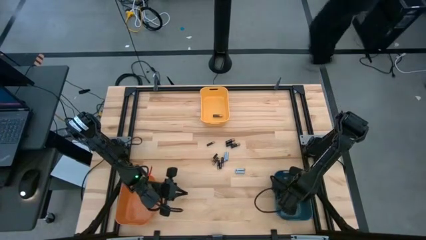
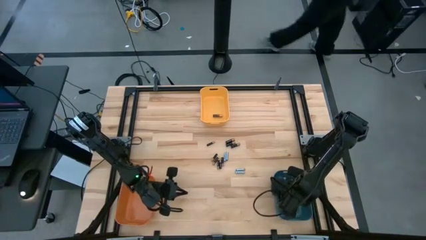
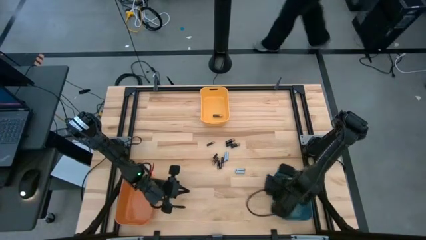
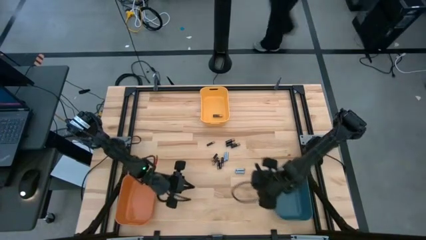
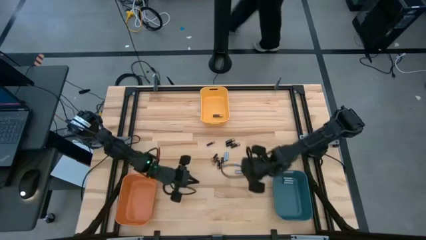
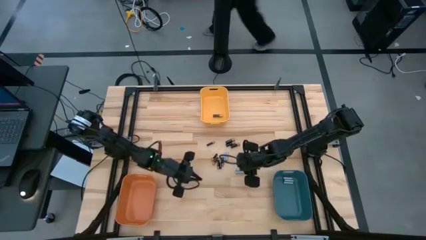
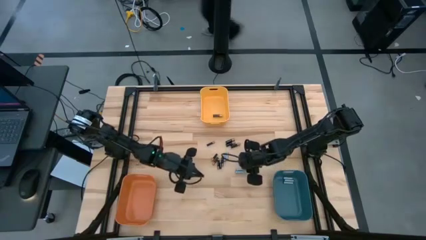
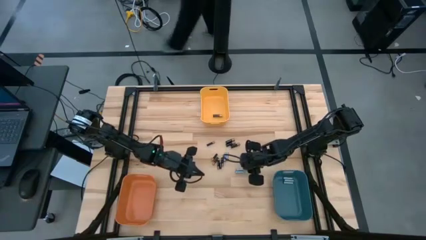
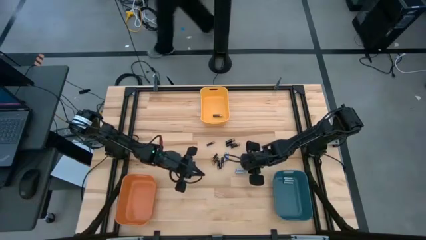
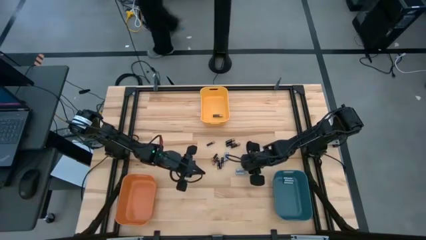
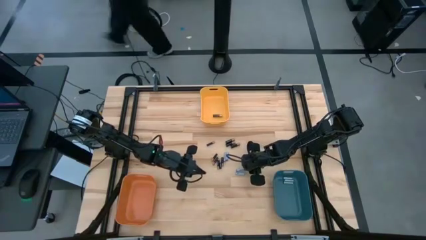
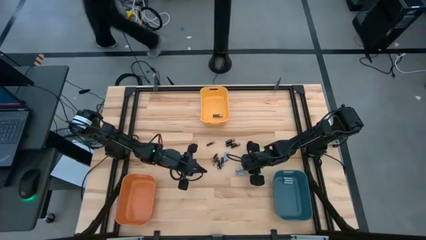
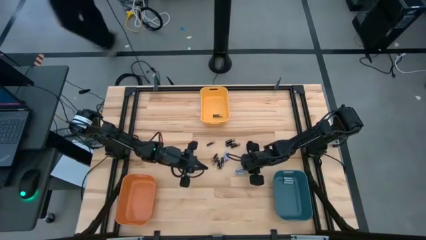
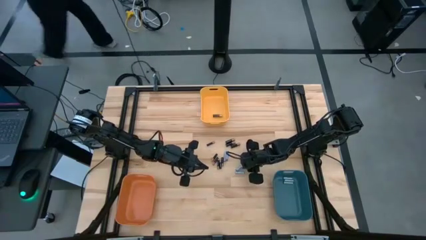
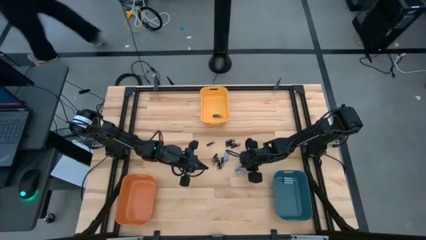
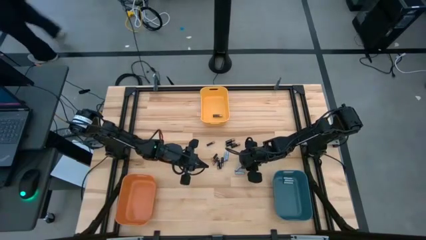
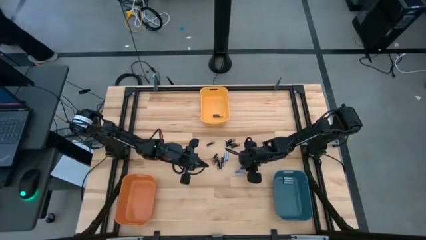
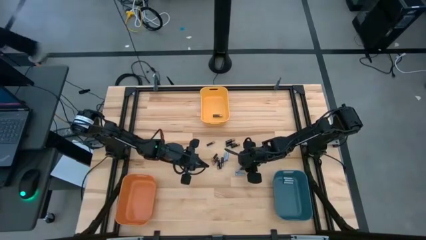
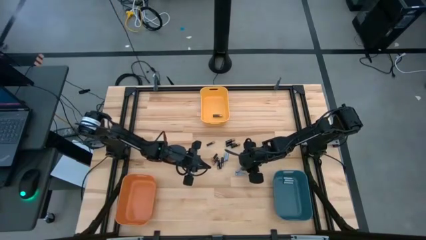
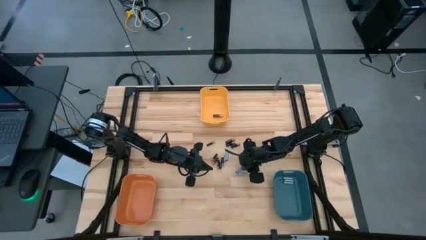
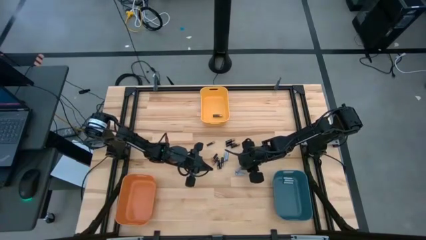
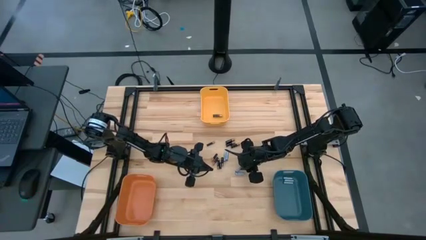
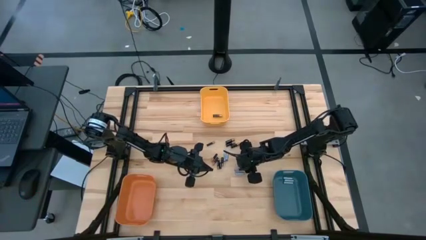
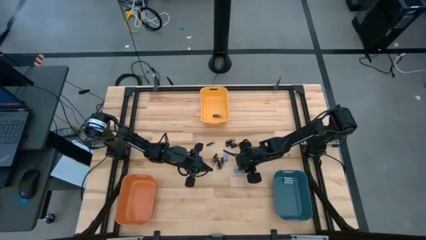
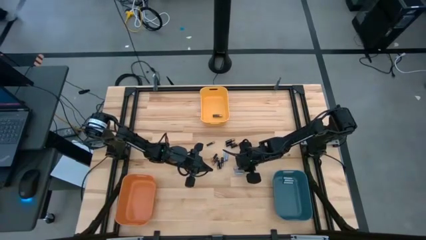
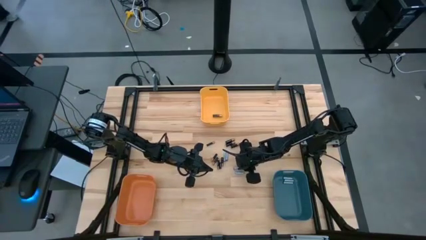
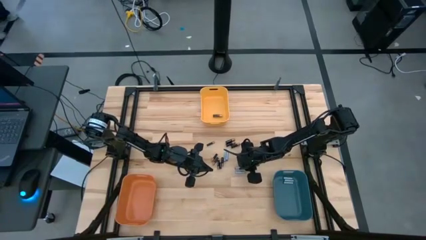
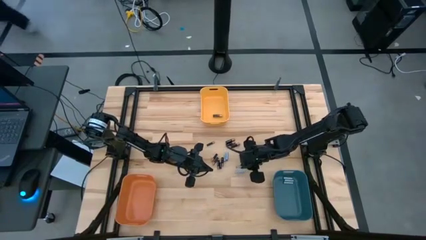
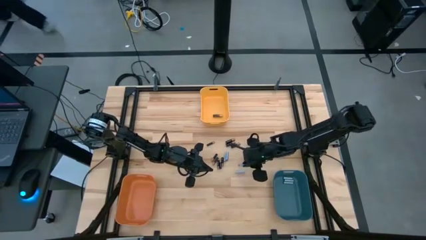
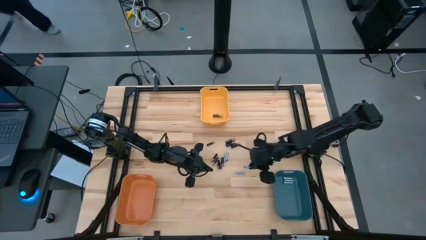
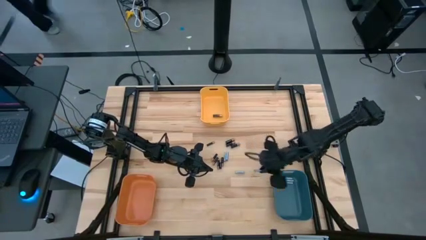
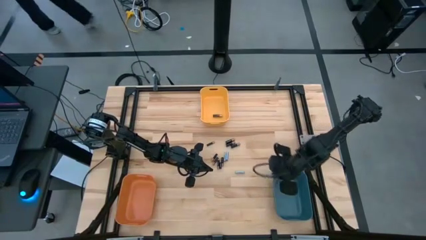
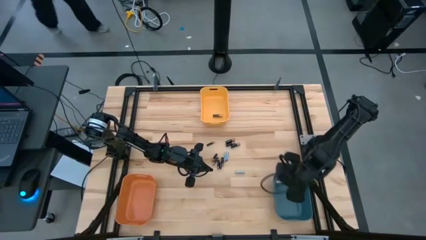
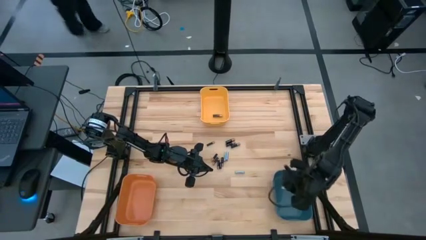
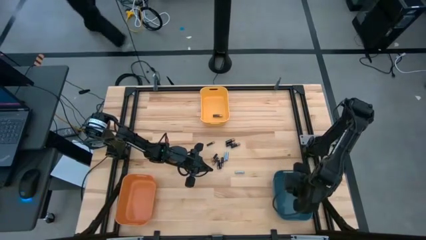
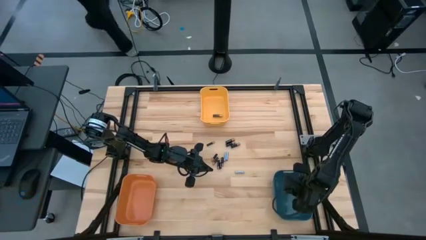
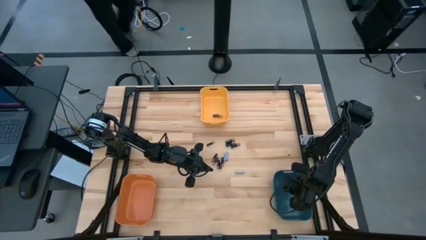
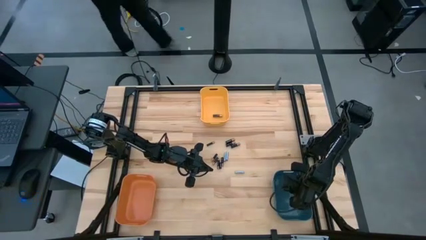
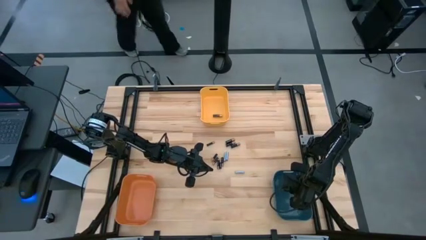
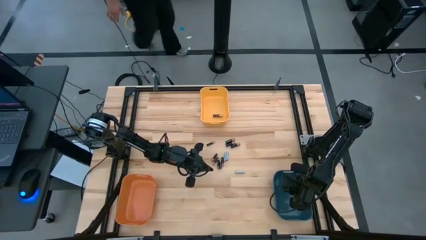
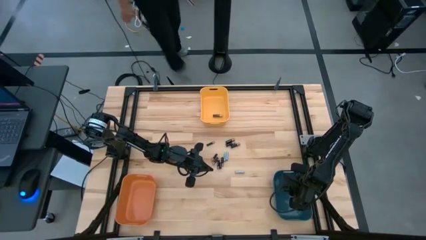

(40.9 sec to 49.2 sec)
Task: Sort batteries
Put the white battery into the blue bin

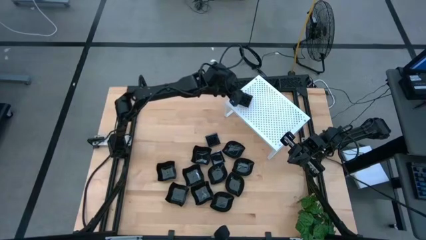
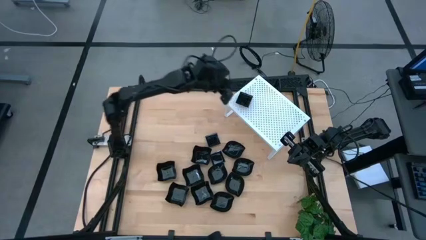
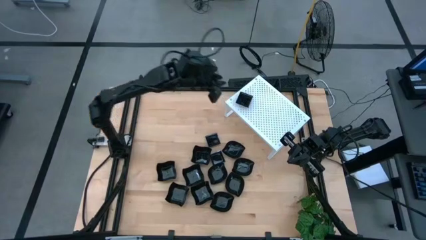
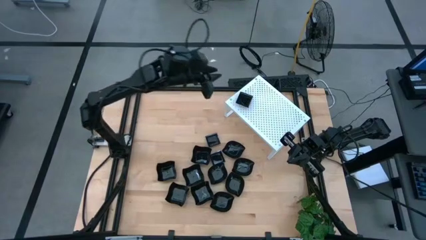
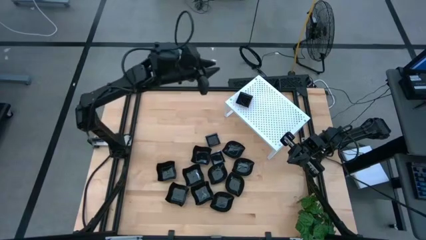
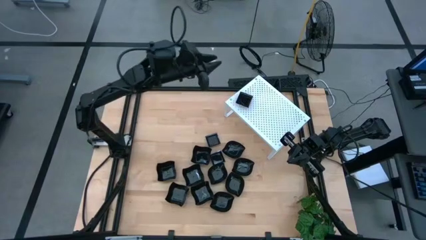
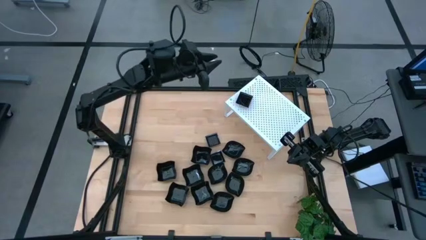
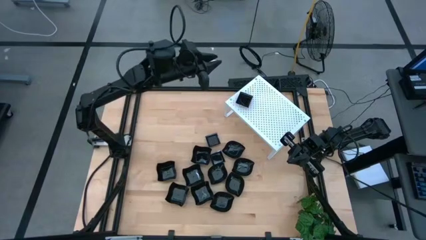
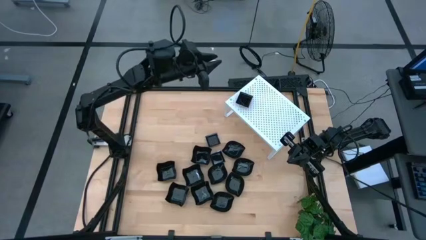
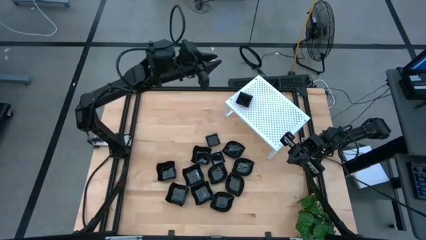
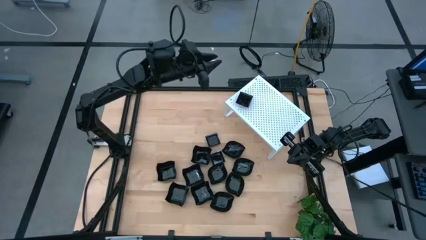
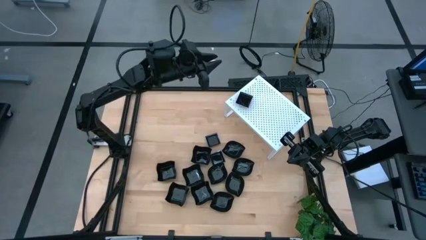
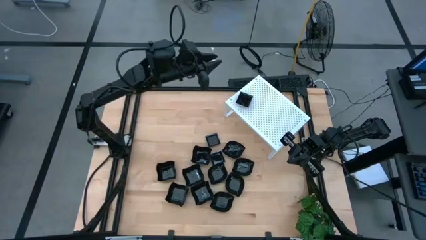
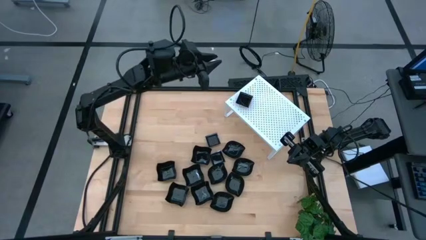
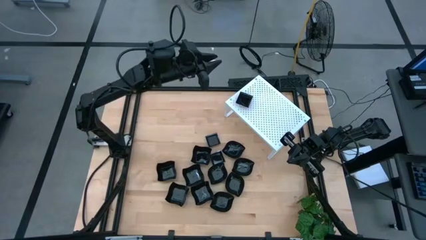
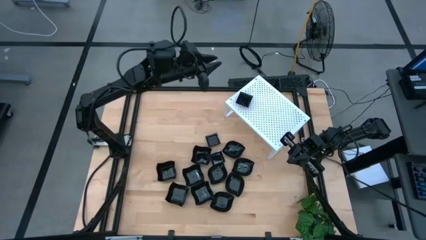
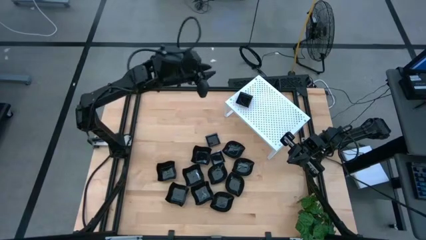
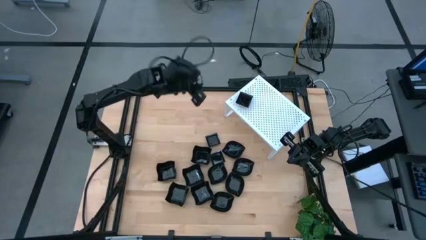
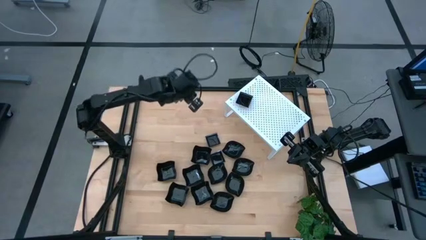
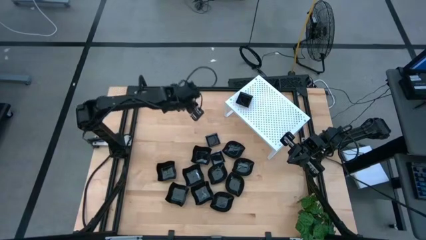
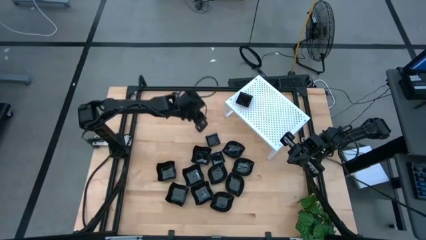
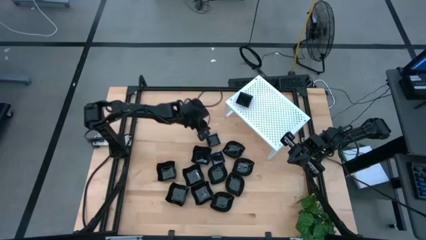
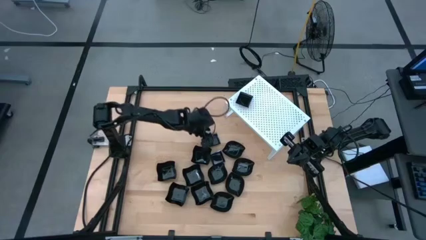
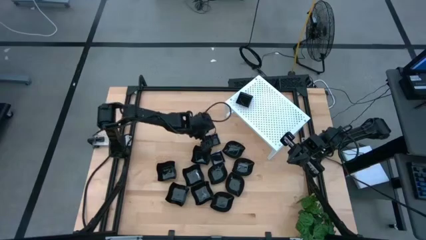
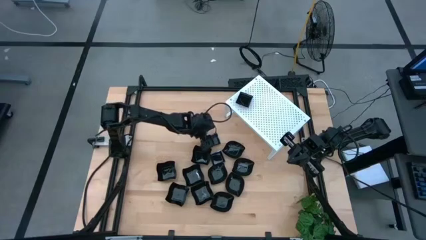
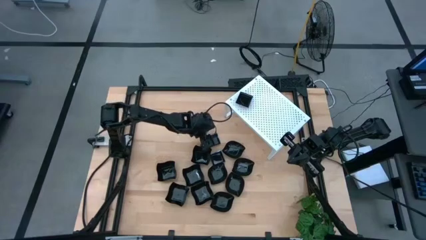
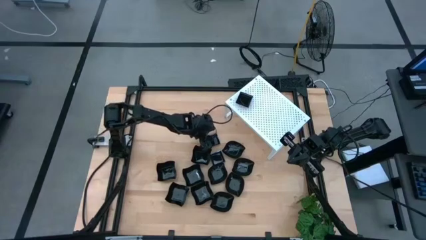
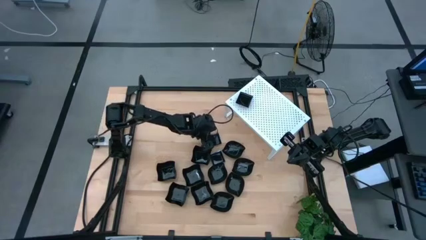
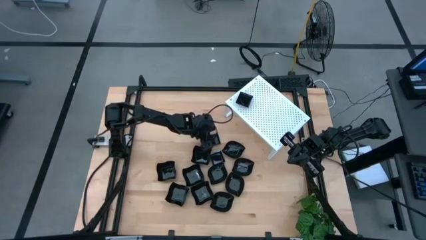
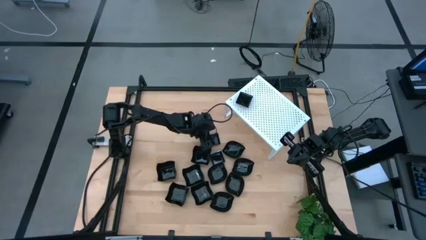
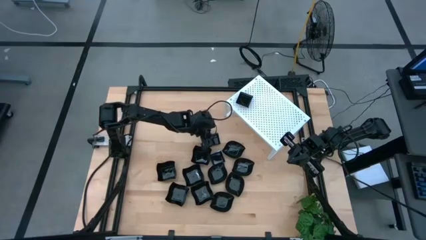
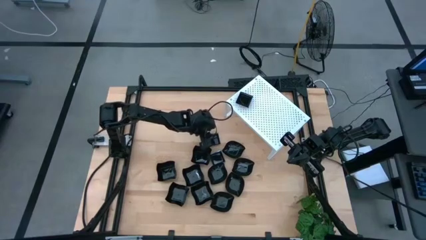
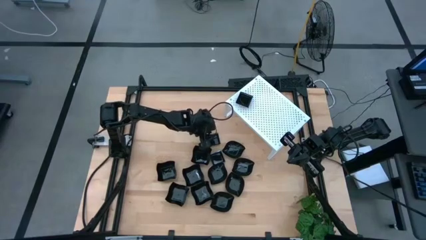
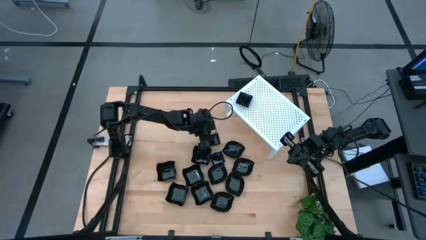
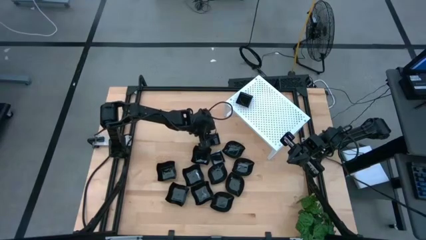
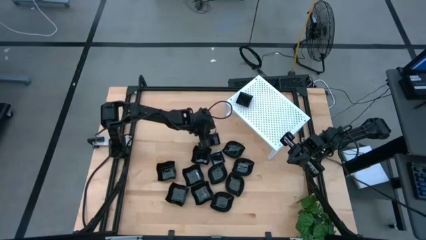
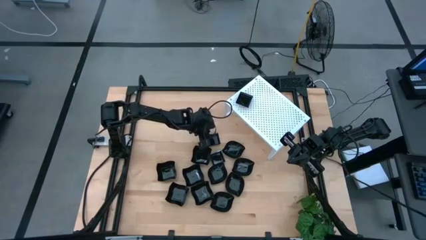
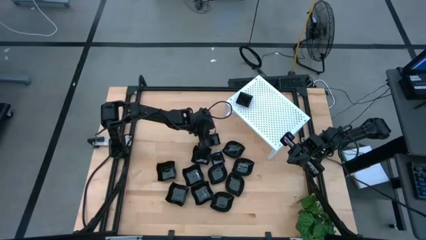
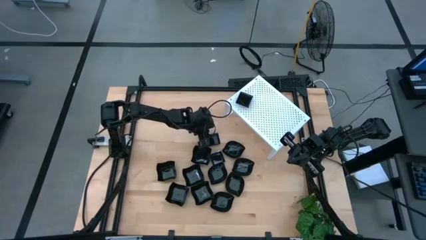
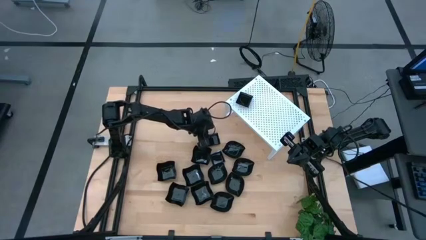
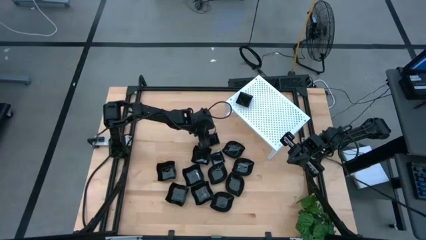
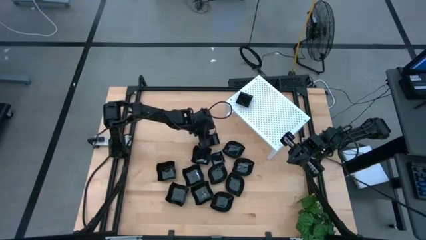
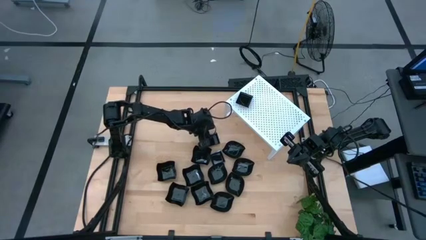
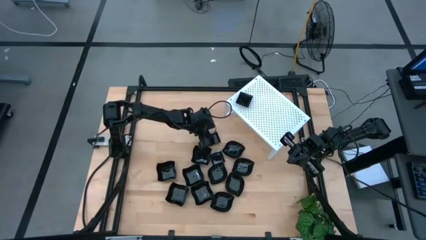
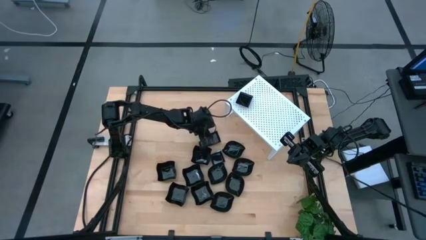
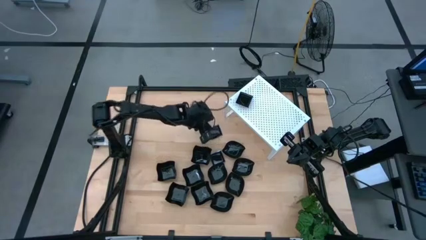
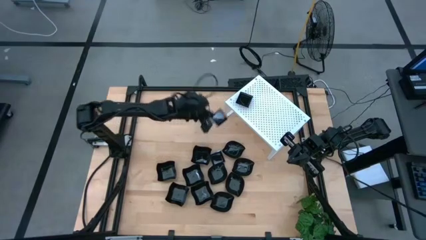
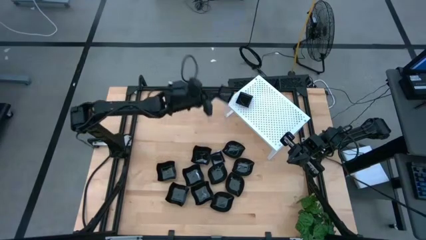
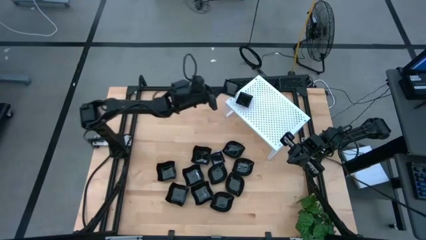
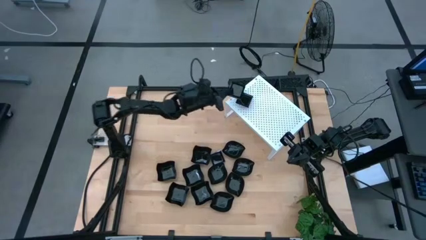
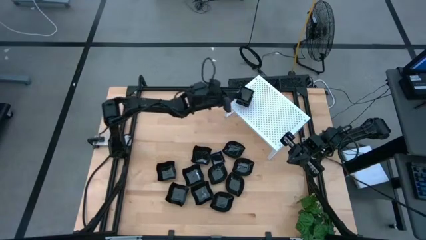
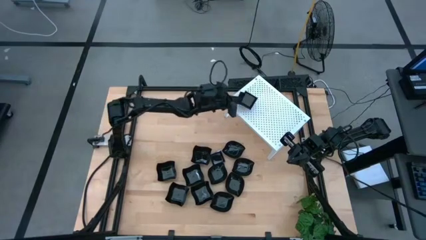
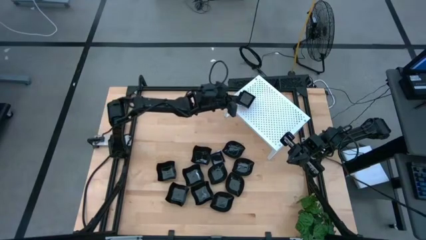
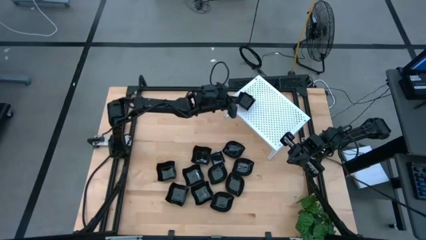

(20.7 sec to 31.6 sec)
Task: Pick & Place Mini shaped plates
Stack the black square plate on top of the other black square plates on the shelf
